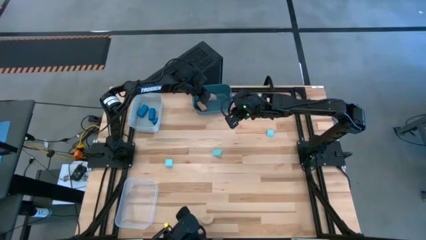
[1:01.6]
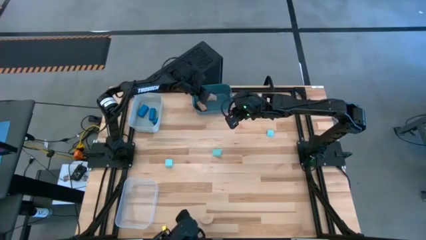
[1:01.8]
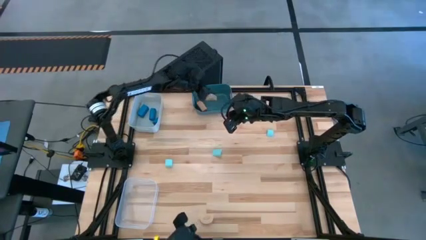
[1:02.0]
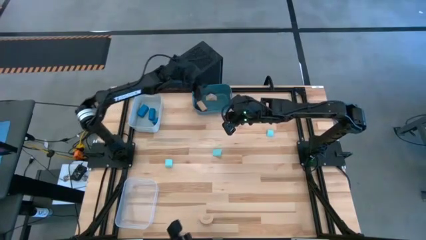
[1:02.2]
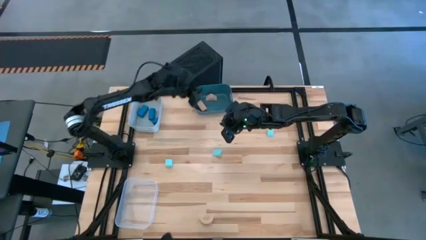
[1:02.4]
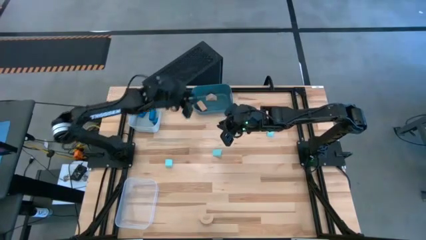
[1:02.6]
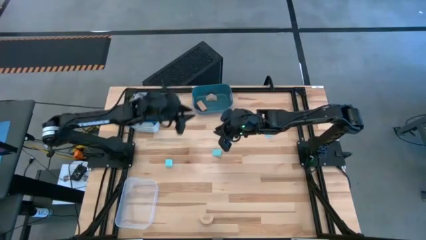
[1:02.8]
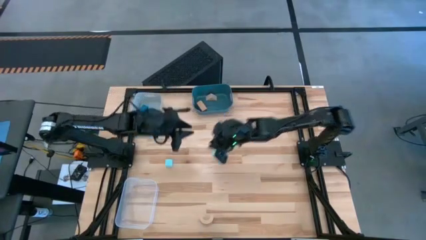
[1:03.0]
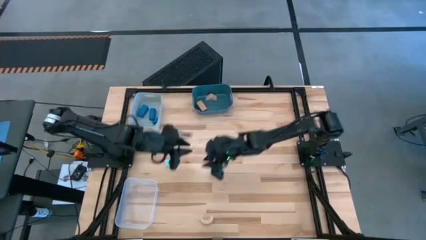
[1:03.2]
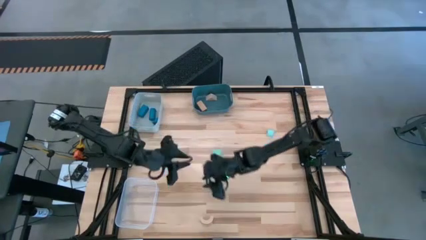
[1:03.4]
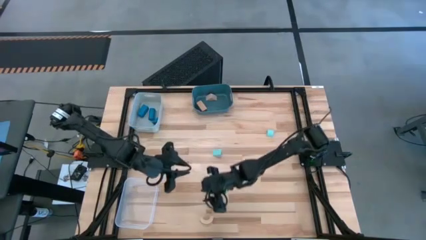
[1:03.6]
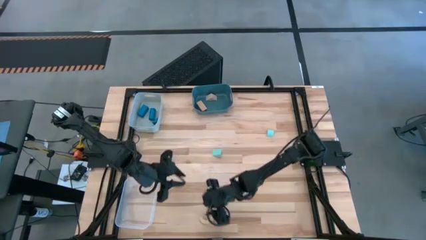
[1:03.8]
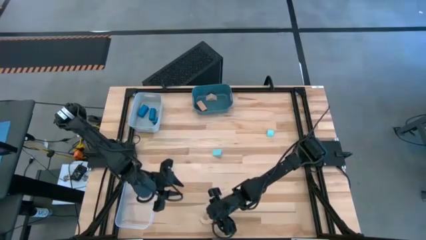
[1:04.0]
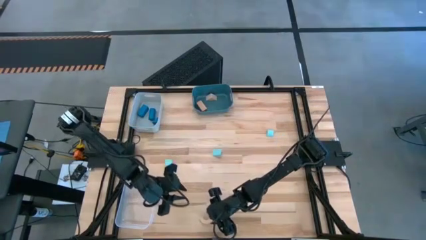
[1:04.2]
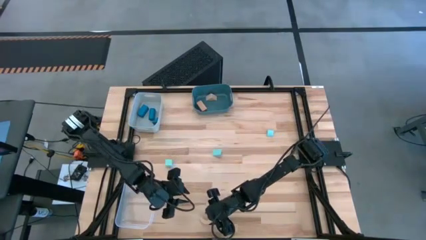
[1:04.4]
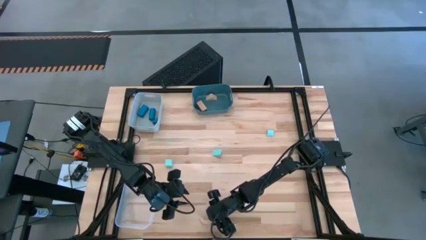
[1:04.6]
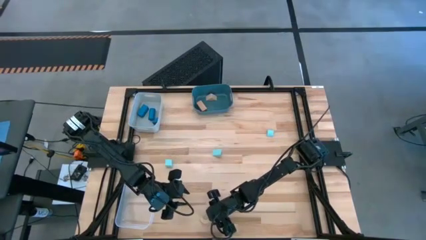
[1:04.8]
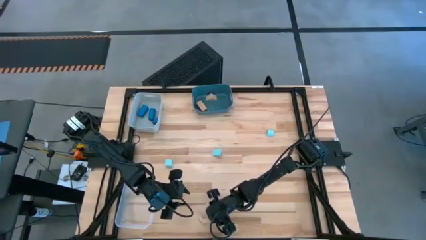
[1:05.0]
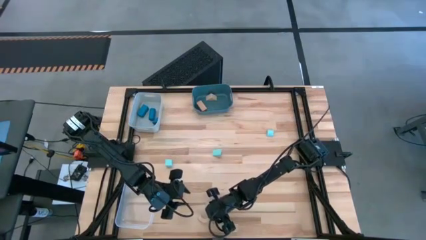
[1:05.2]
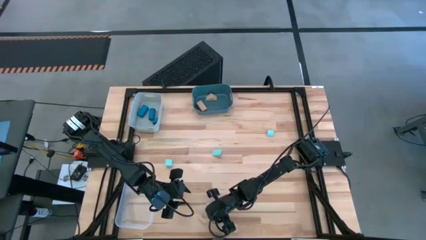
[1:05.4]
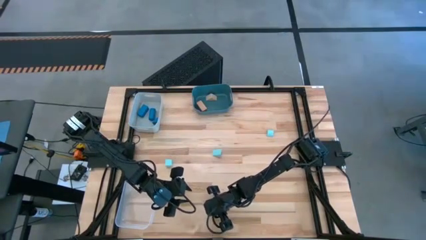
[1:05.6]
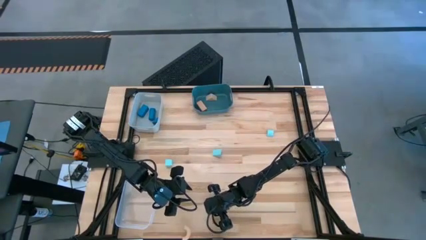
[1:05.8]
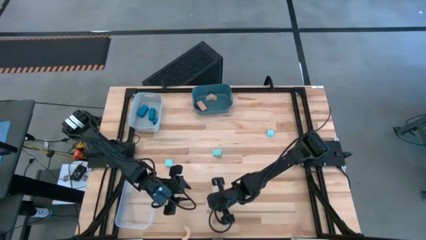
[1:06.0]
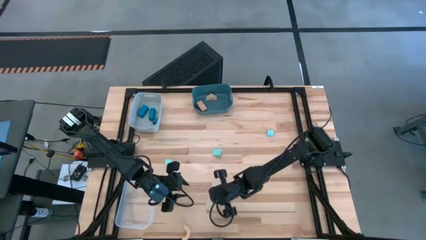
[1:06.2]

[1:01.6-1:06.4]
Task: Sort & place blocks by color
Put the brown block into the blue bin

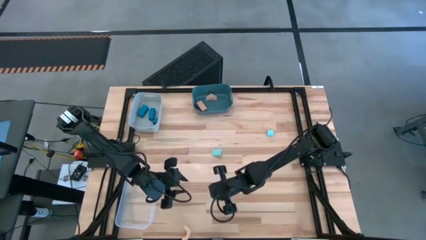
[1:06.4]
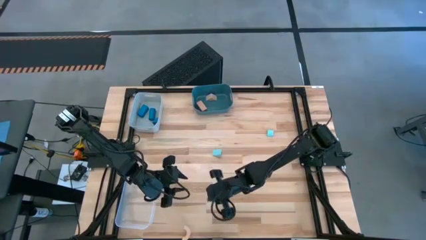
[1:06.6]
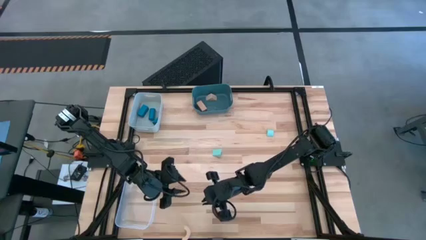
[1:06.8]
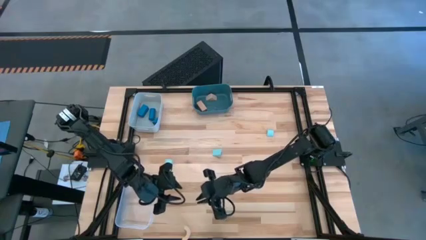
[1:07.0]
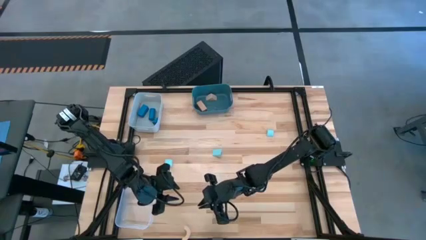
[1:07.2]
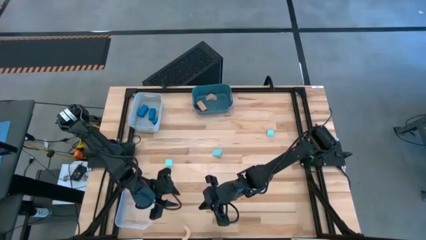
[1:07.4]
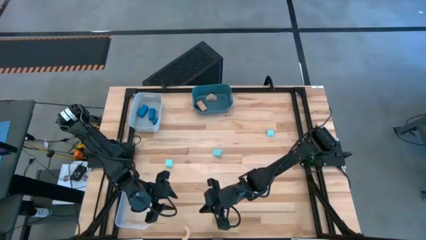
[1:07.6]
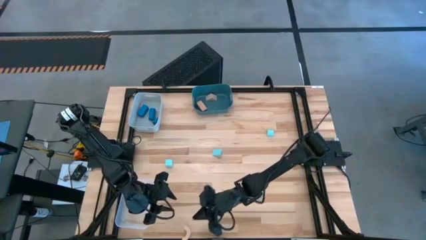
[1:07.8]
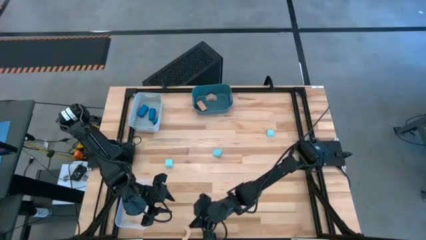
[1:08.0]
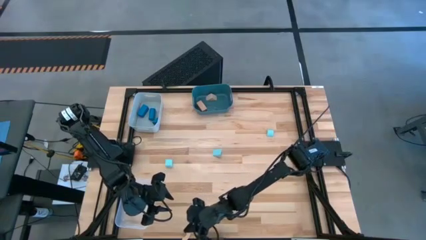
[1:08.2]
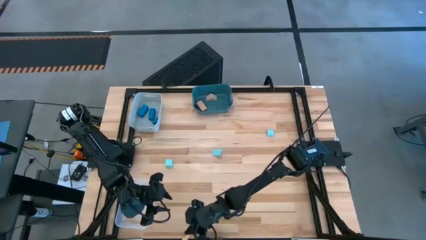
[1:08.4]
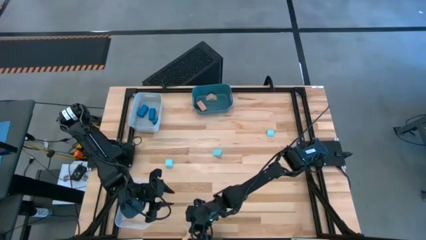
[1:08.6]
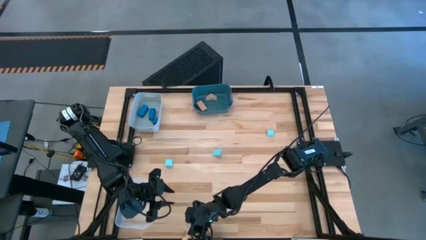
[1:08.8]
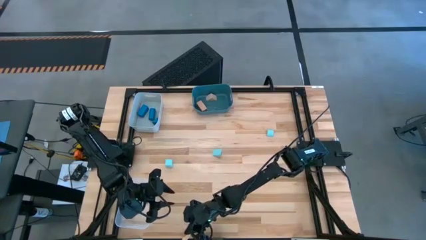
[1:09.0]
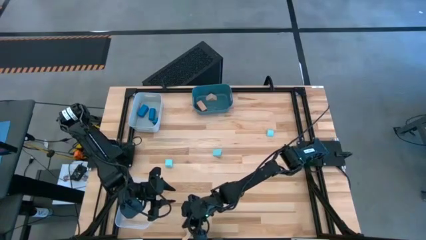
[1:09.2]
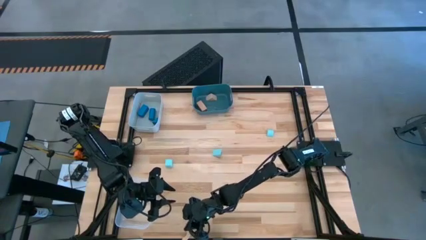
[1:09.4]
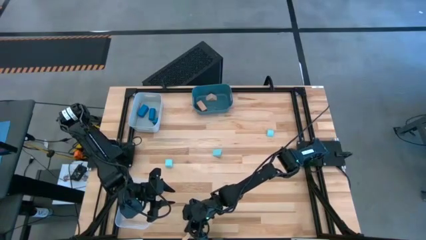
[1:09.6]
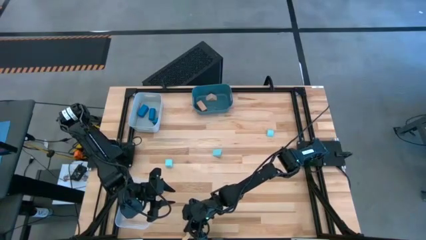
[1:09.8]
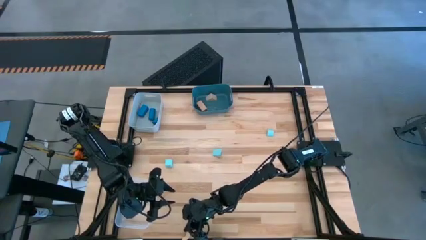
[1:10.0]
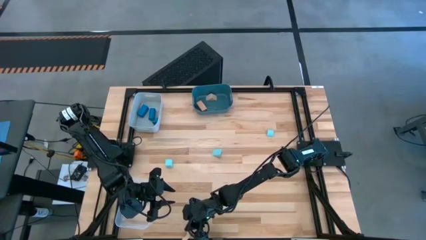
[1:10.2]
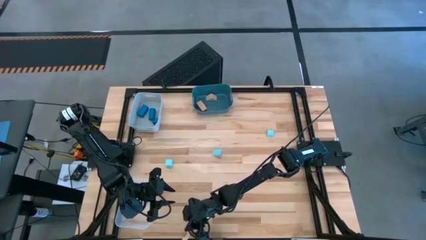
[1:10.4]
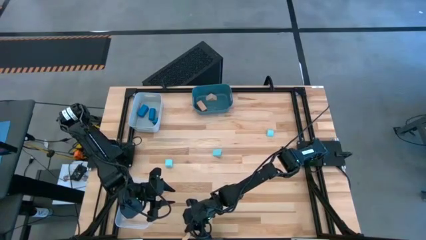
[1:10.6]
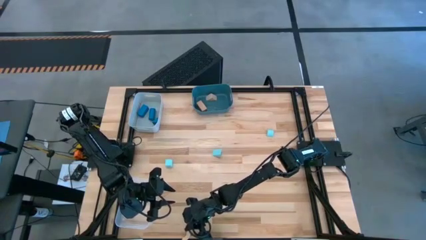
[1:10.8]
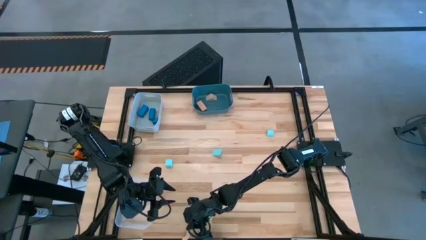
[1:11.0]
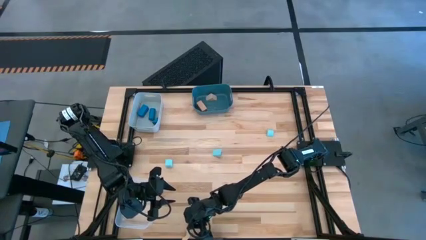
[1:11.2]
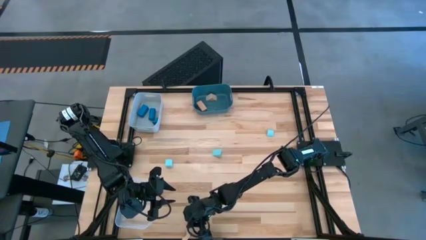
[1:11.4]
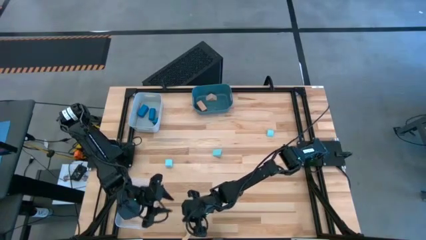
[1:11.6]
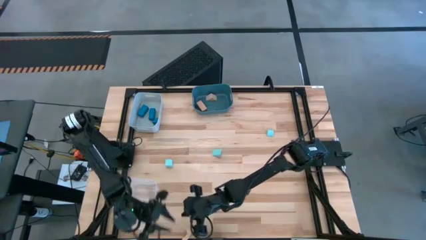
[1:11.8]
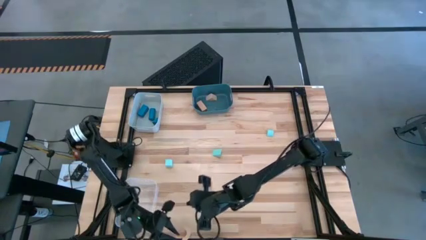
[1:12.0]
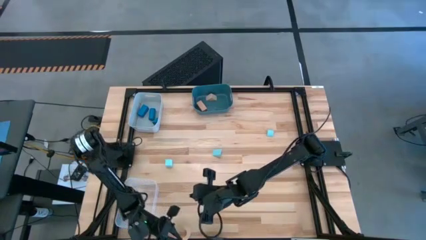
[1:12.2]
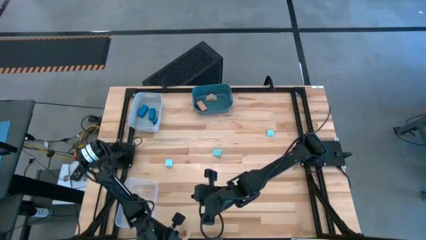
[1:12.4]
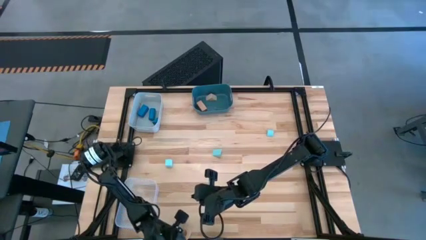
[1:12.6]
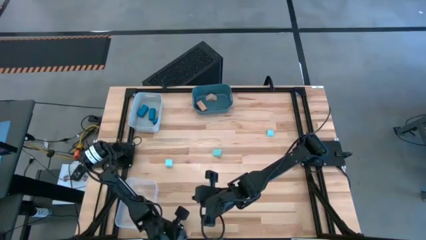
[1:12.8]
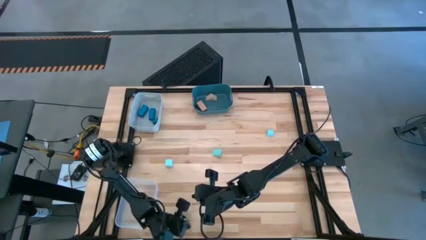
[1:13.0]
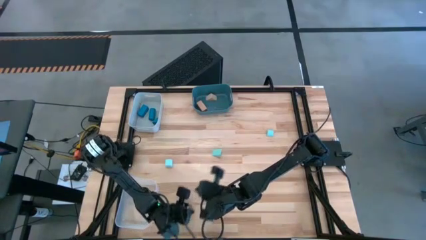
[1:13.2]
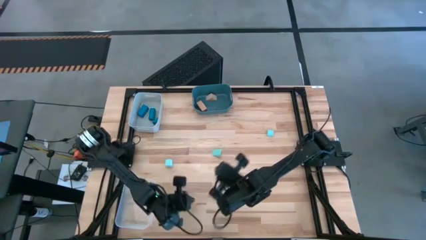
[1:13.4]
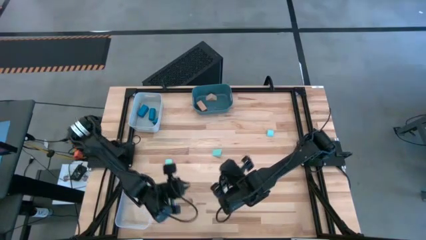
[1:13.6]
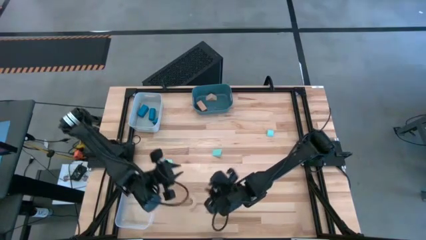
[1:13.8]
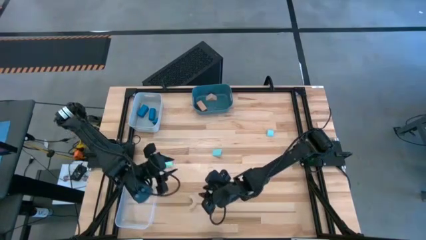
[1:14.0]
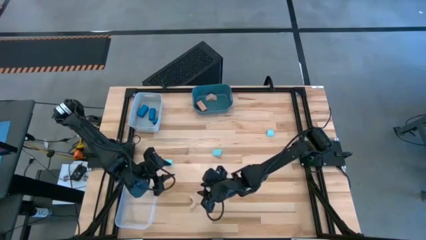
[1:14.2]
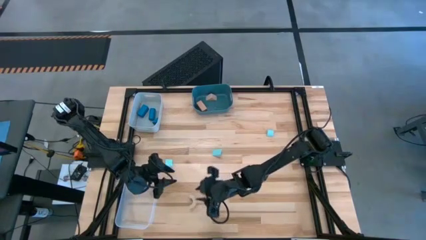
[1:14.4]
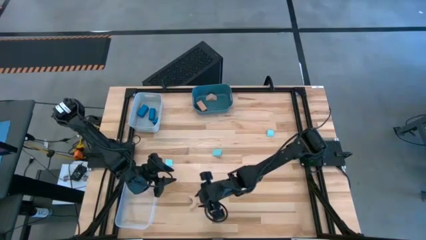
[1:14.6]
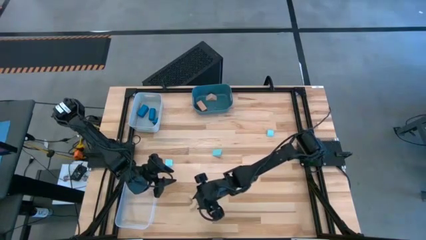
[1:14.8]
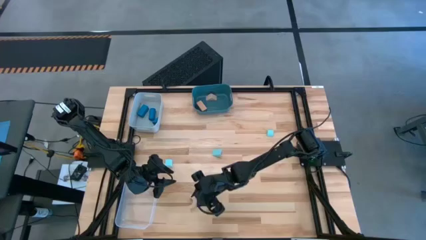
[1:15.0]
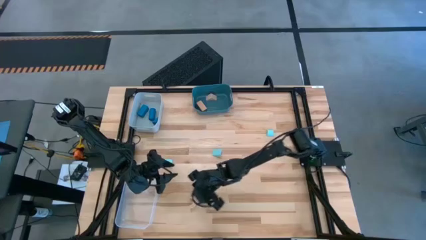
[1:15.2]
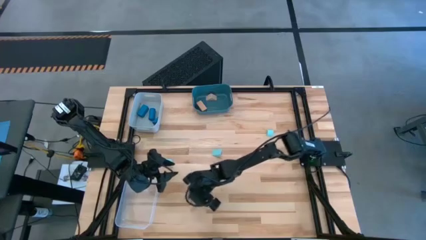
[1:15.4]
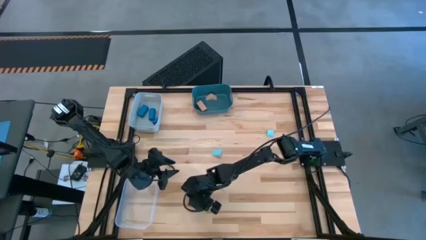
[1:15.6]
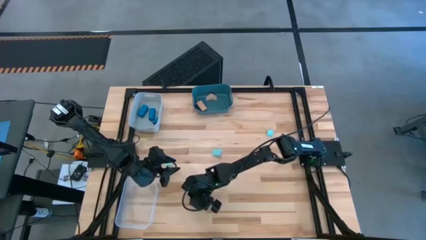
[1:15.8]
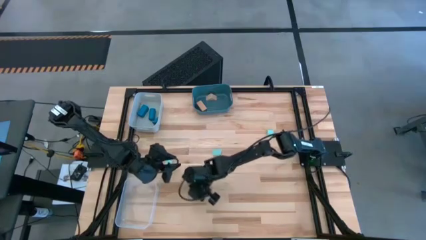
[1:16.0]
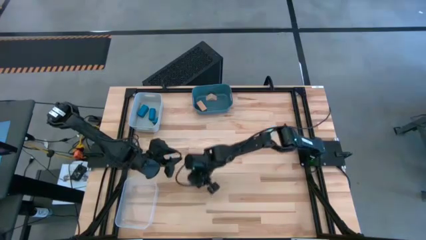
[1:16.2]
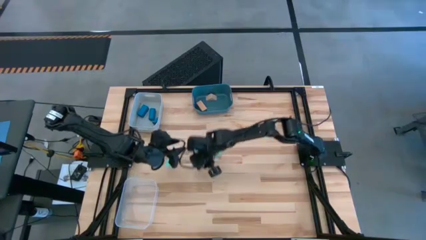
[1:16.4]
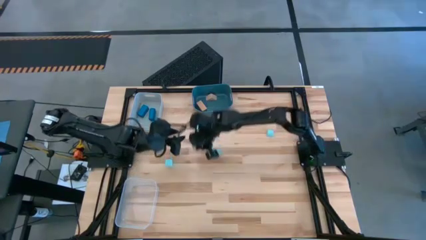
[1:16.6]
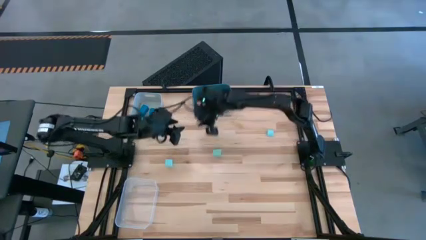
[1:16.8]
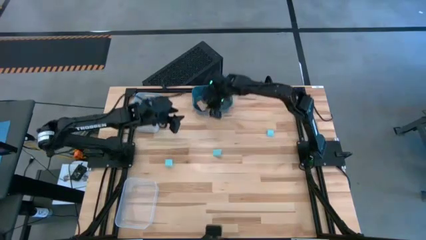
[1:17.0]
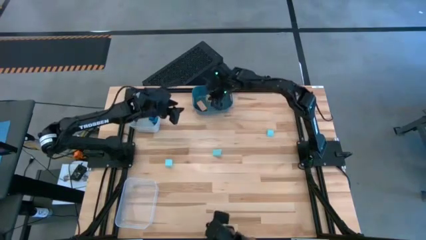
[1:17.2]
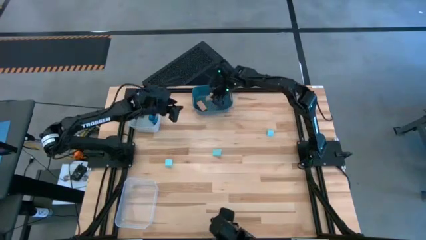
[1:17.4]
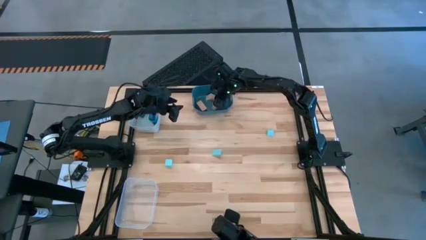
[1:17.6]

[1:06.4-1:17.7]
Put the brown block into the blue bin
